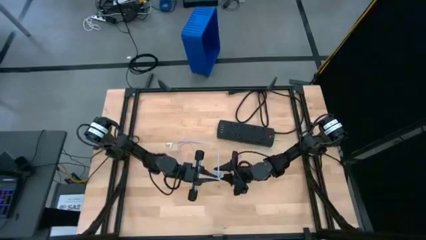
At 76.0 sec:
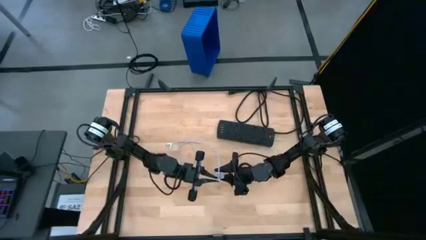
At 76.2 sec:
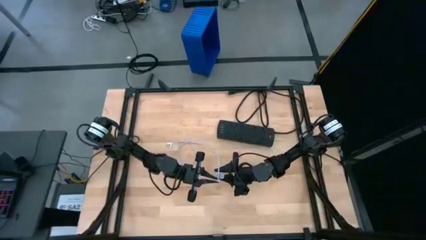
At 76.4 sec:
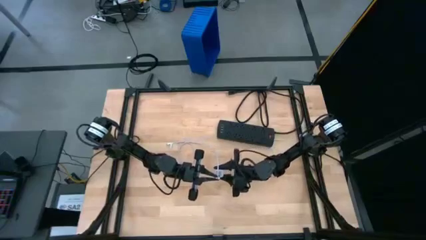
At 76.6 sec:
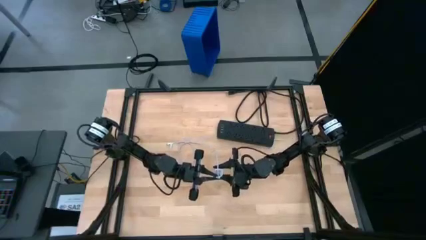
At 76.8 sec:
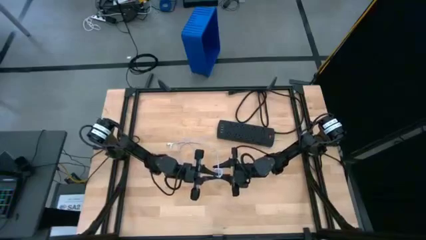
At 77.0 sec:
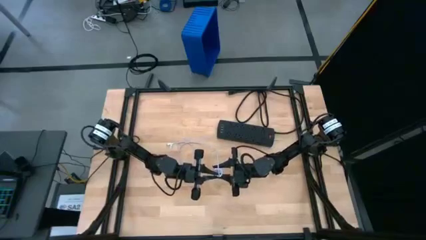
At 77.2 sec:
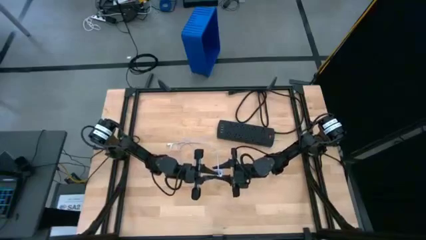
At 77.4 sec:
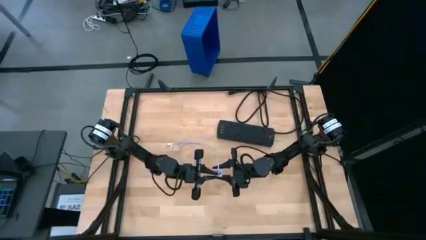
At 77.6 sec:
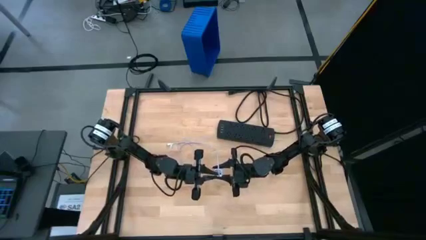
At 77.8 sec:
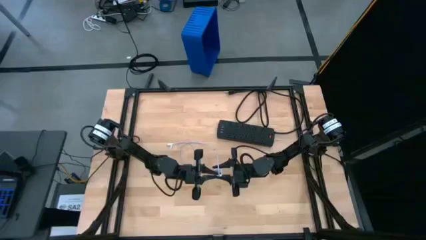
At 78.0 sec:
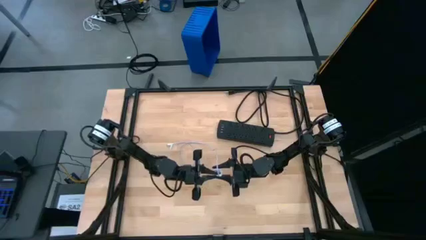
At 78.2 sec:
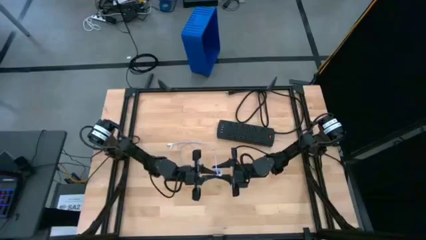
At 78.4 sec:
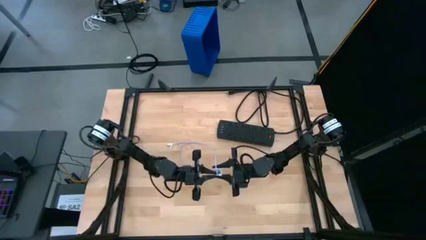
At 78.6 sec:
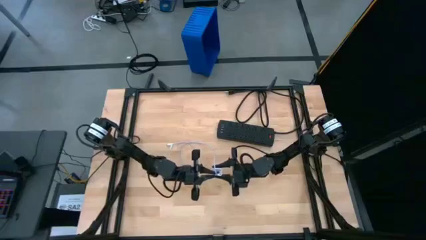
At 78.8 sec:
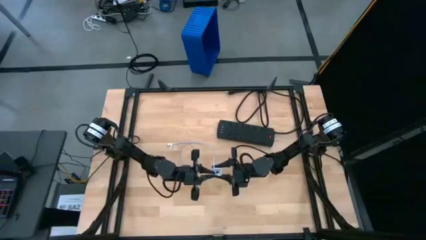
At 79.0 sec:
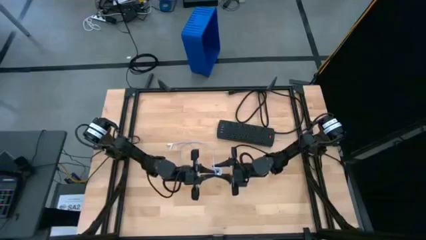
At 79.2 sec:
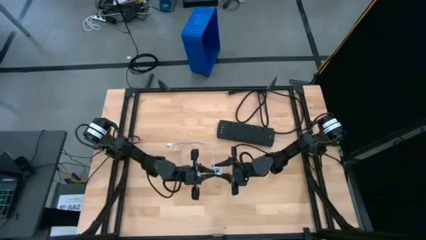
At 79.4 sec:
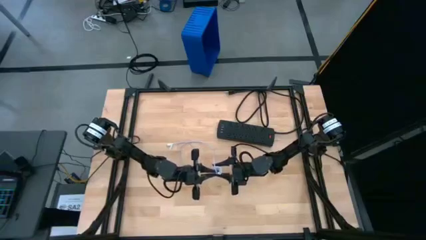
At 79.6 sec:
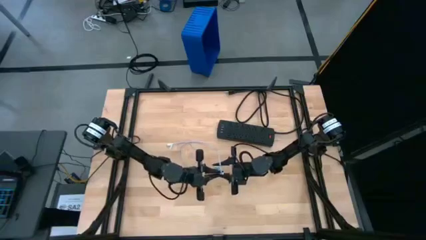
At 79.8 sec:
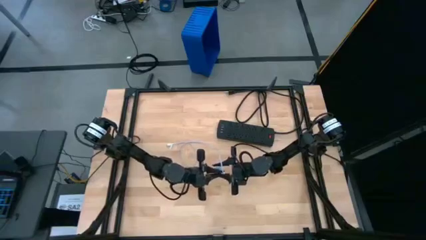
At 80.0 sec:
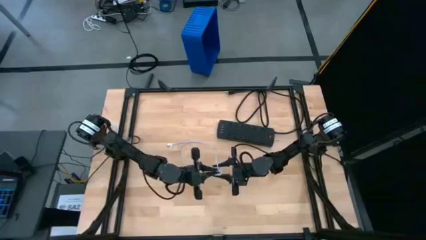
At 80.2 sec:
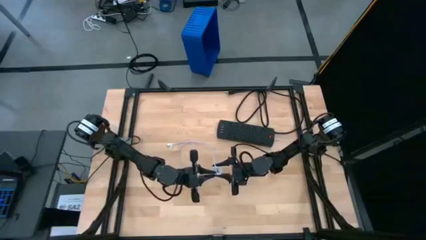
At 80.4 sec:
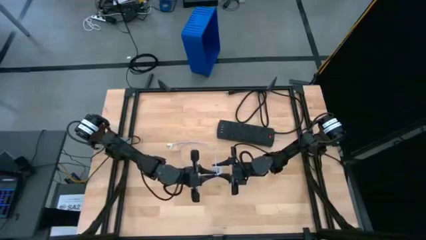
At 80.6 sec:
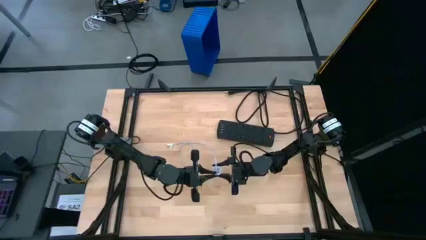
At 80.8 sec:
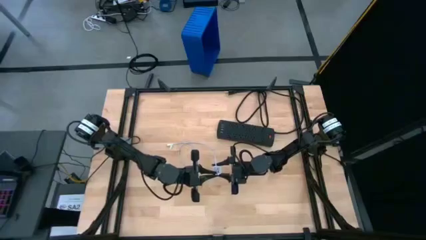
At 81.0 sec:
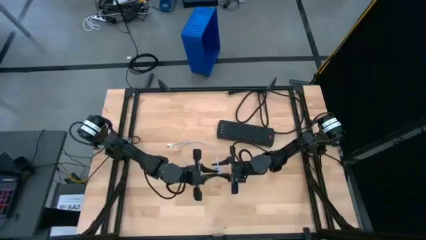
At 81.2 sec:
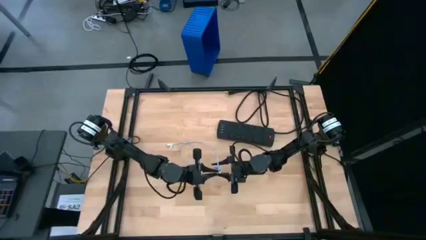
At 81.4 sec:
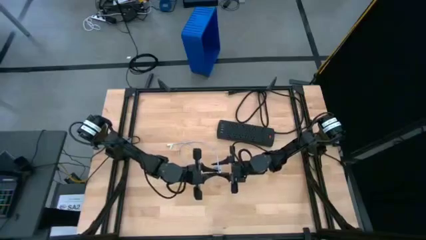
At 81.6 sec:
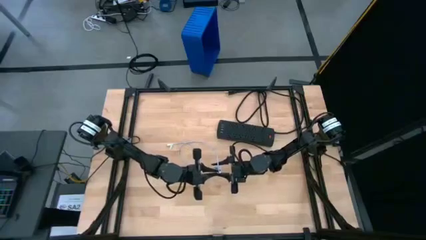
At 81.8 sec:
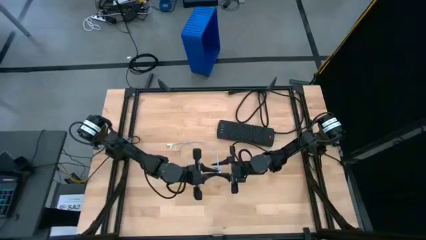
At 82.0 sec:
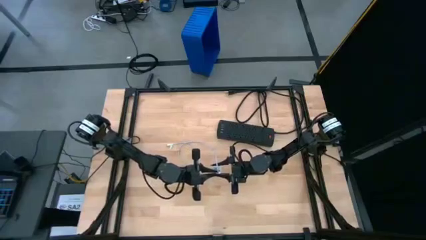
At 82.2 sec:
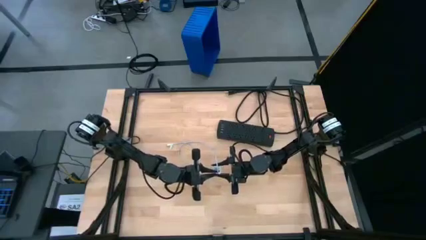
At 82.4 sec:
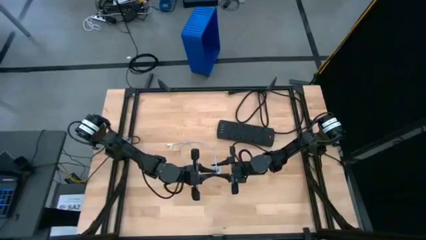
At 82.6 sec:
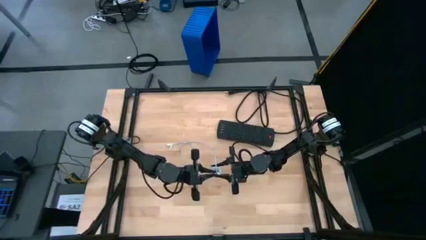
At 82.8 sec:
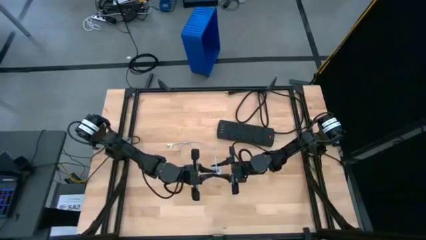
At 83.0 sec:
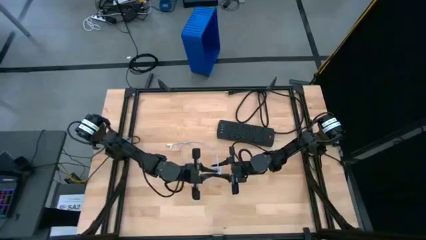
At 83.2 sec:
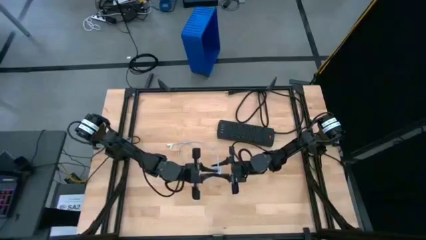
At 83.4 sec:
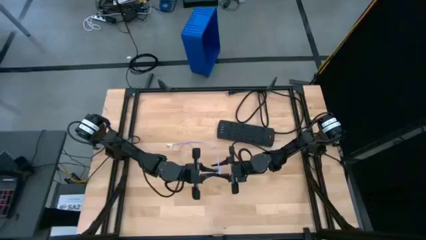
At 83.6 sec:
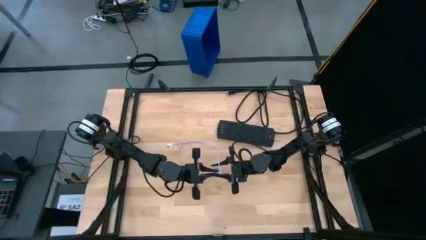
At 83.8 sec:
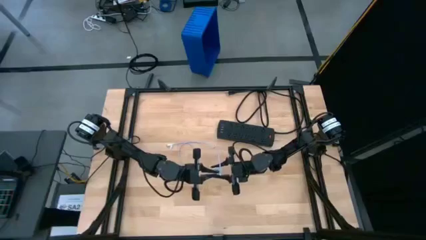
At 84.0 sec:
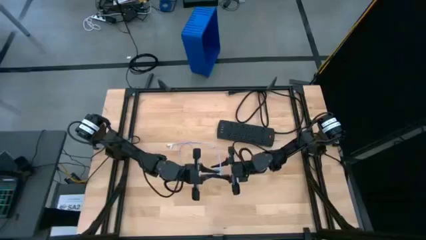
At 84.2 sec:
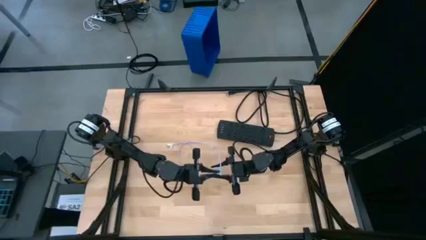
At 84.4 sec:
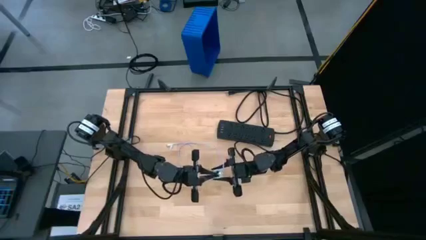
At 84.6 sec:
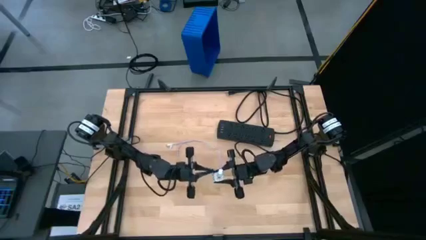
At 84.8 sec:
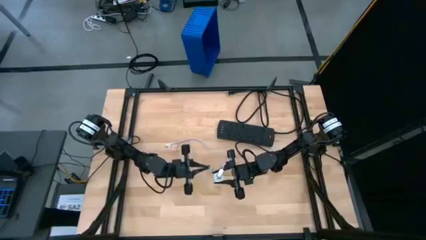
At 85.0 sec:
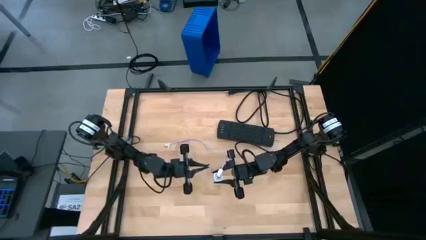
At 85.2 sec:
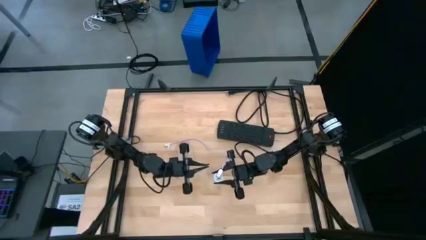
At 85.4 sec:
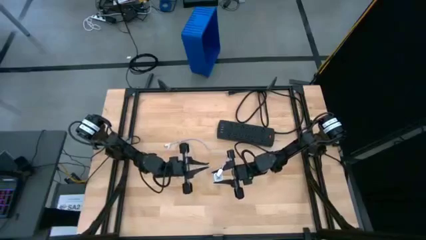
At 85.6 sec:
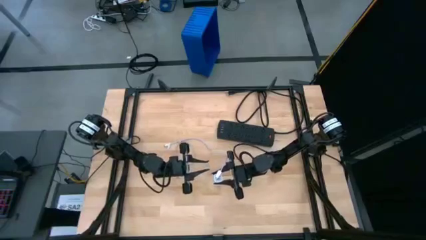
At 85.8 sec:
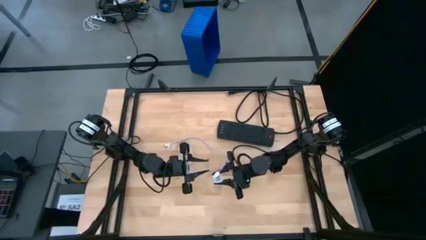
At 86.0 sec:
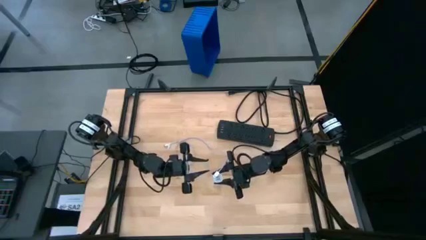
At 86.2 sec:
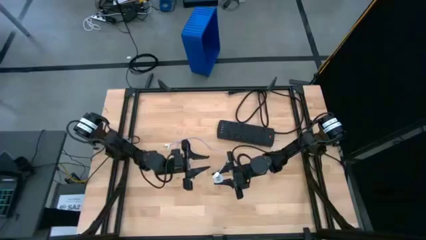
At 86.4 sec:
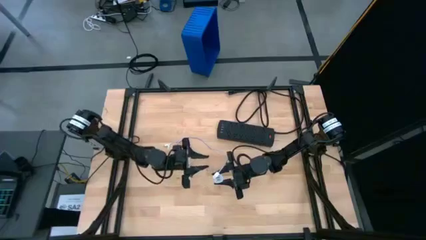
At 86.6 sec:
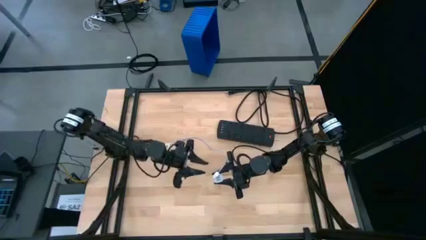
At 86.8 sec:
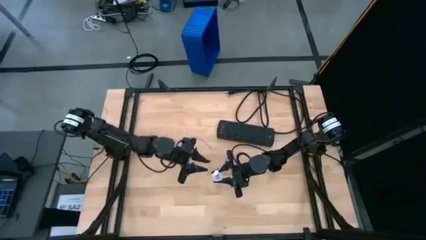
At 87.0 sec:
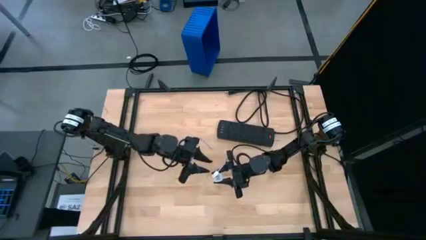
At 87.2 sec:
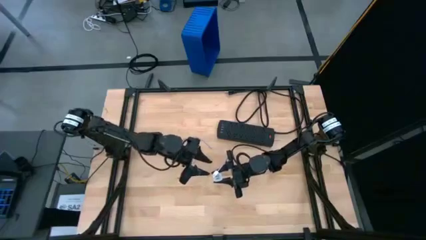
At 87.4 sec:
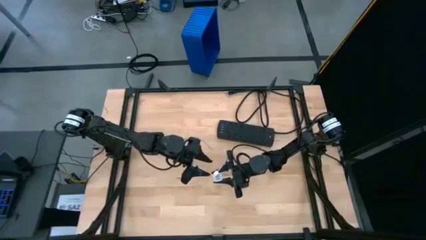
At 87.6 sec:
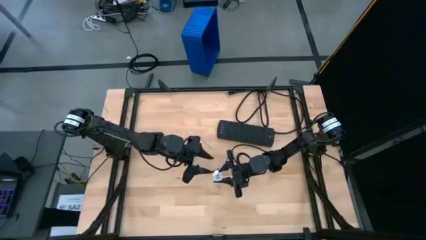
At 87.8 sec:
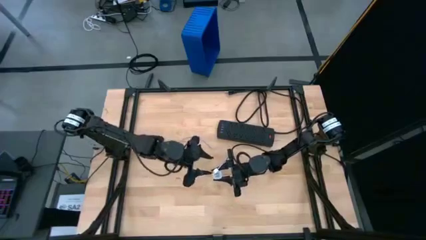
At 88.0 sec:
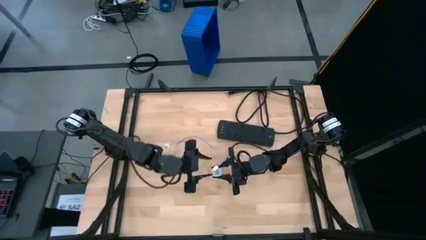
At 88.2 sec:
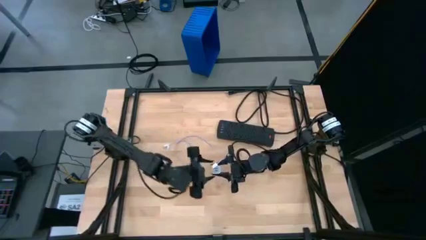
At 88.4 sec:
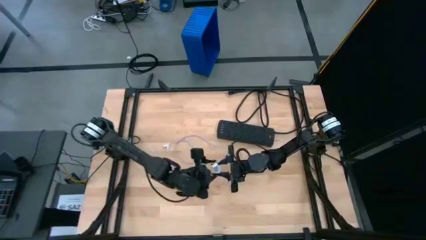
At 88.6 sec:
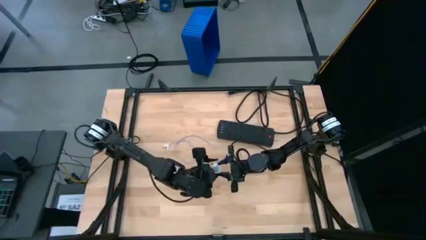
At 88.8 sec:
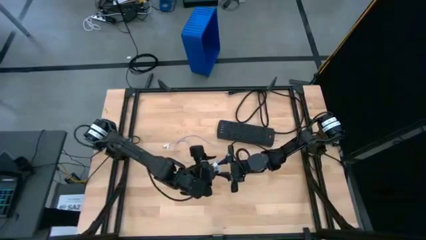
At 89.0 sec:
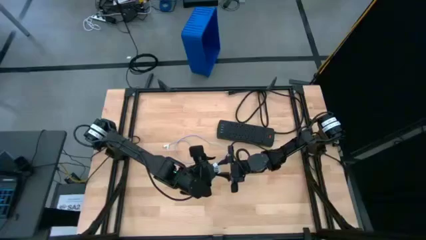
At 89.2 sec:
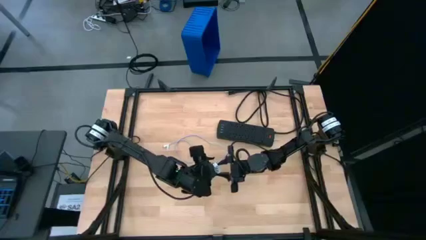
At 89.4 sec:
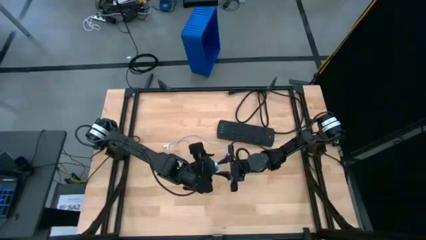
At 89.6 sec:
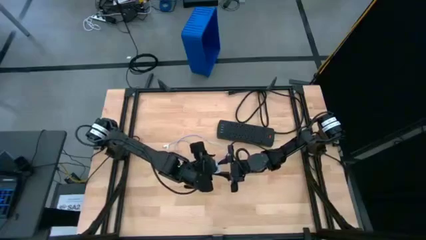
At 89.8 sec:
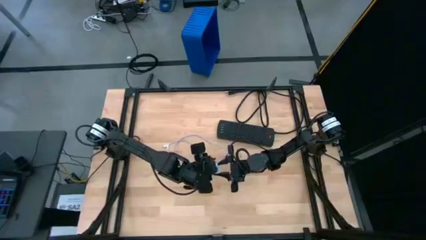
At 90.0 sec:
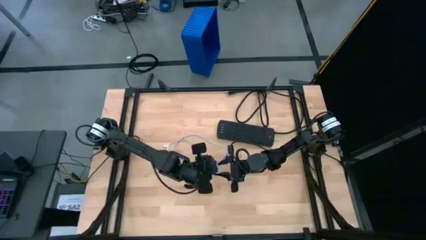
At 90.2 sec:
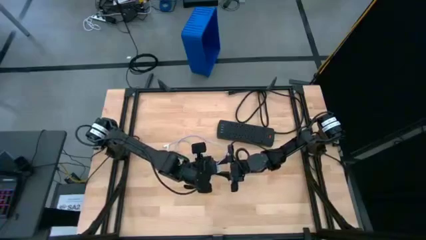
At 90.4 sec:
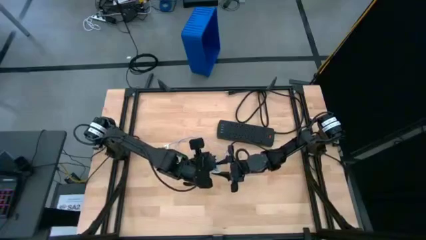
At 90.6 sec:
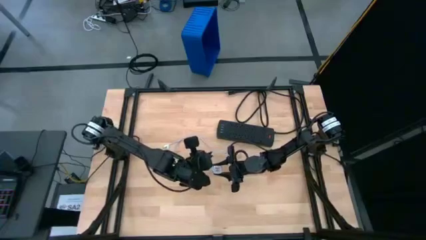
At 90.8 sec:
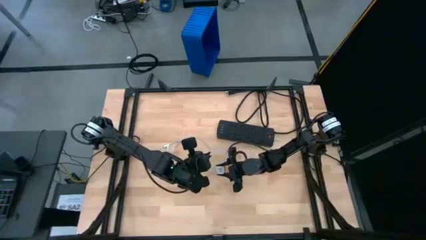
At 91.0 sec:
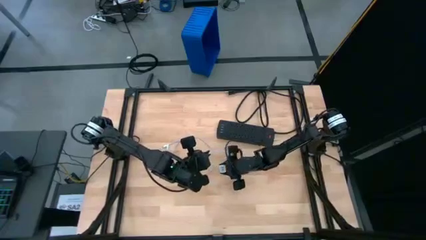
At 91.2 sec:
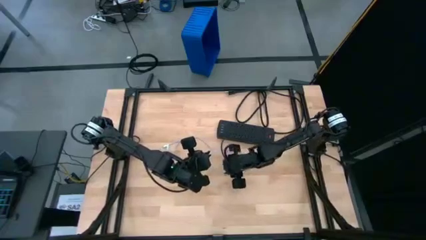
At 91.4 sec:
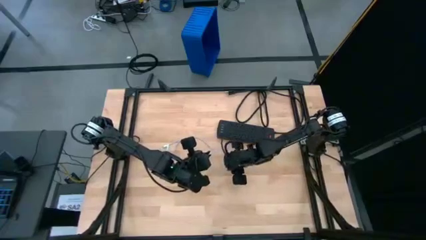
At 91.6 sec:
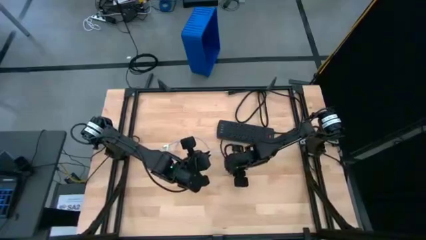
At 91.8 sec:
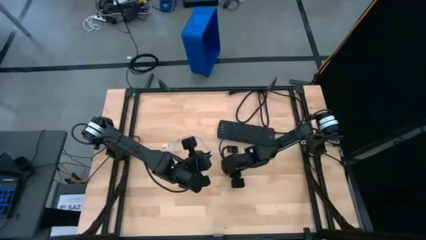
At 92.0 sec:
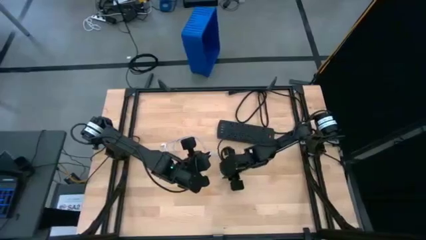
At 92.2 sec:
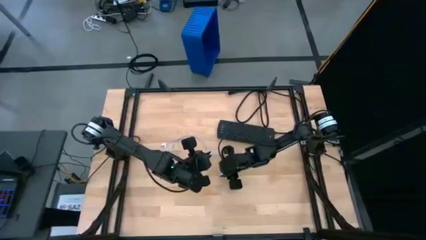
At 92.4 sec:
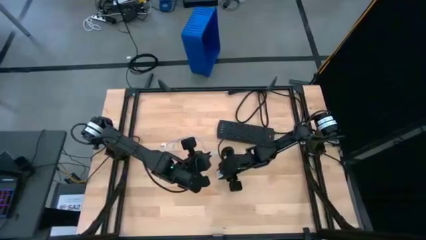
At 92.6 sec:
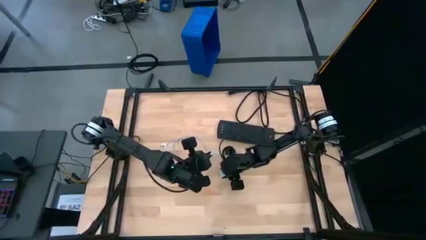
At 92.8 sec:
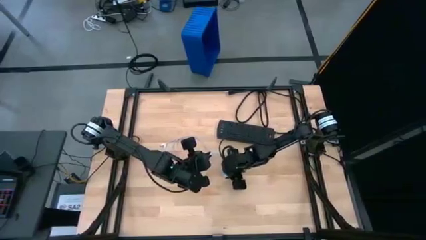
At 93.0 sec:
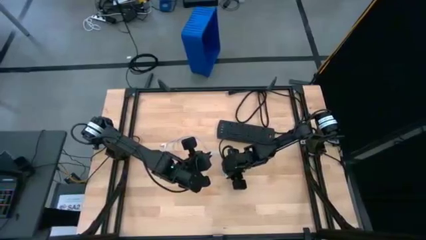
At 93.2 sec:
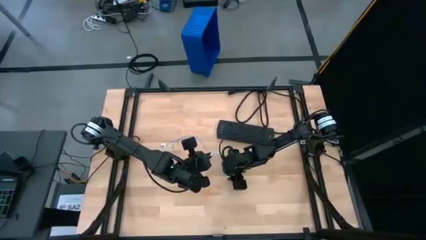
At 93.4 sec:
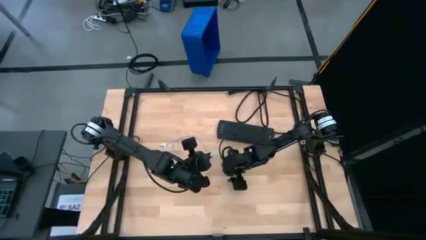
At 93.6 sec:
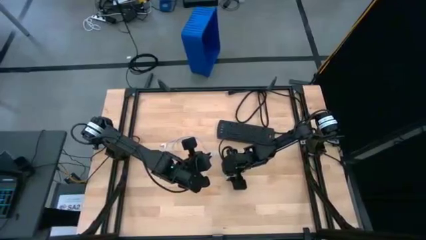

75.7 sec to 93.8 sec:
Task: Insert USB
Insert the white charger cable into the white charger adapter
